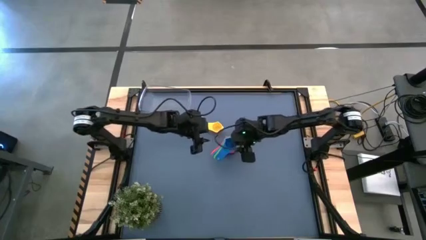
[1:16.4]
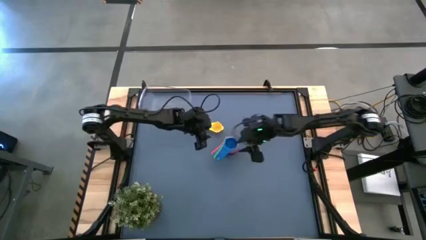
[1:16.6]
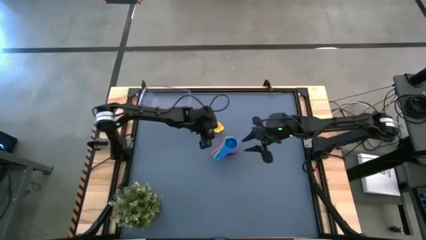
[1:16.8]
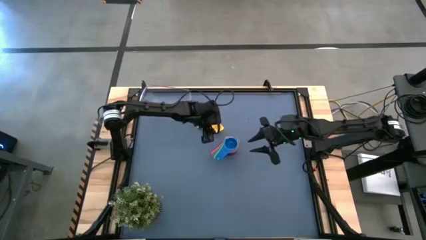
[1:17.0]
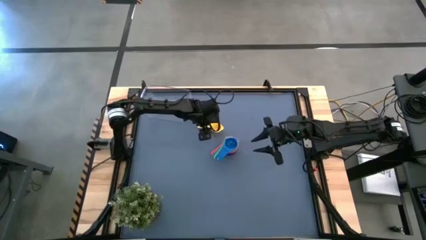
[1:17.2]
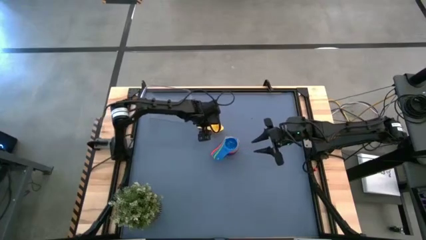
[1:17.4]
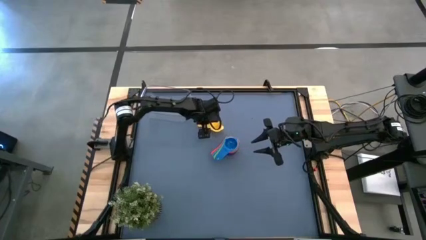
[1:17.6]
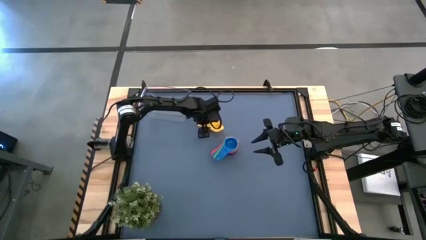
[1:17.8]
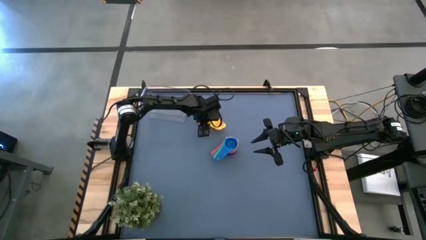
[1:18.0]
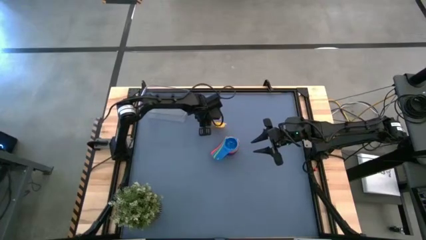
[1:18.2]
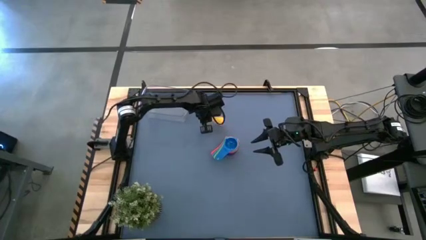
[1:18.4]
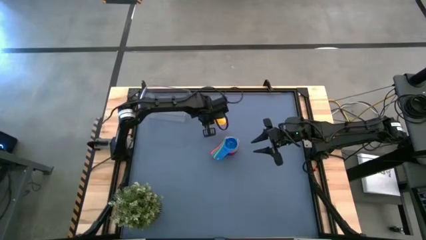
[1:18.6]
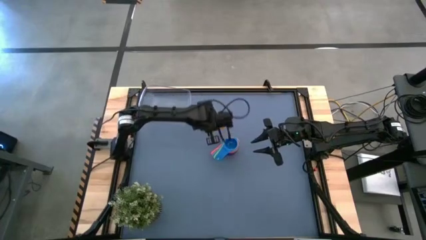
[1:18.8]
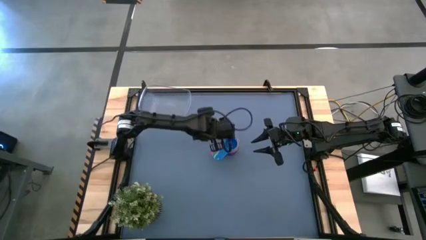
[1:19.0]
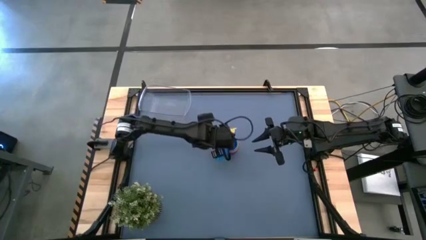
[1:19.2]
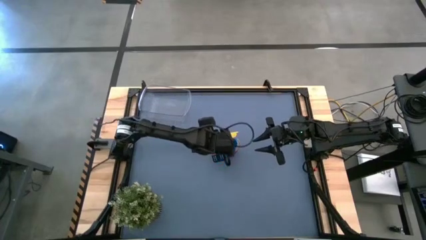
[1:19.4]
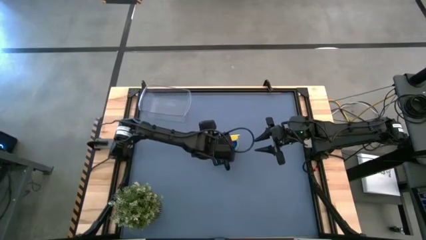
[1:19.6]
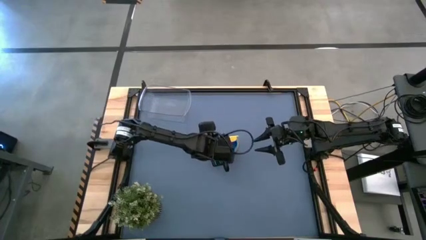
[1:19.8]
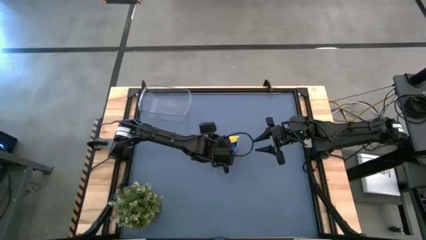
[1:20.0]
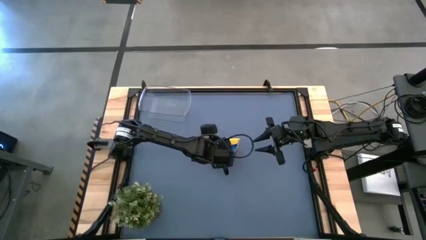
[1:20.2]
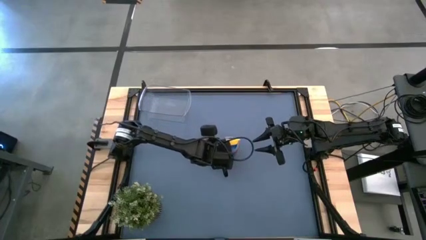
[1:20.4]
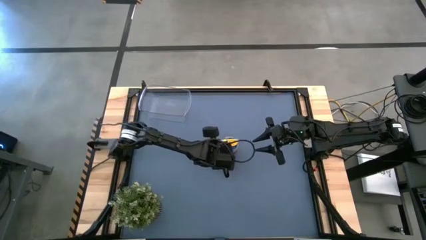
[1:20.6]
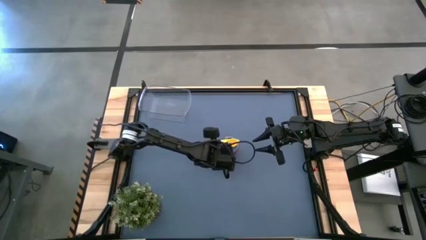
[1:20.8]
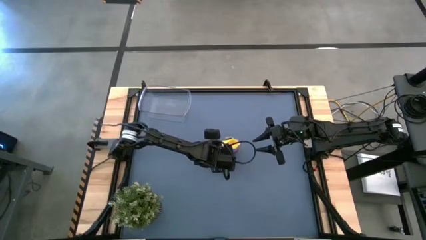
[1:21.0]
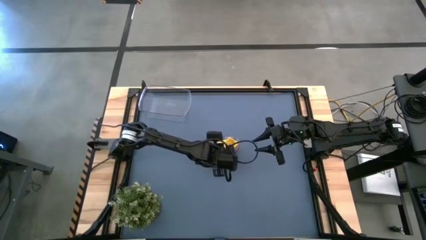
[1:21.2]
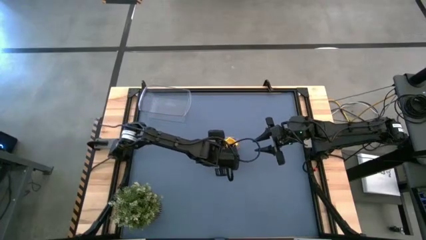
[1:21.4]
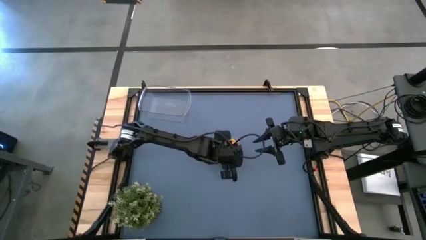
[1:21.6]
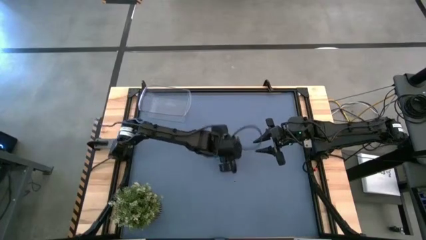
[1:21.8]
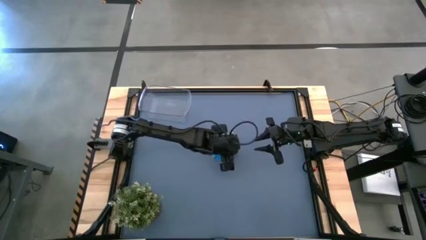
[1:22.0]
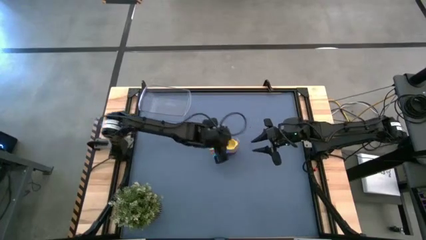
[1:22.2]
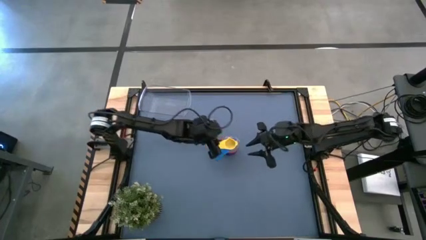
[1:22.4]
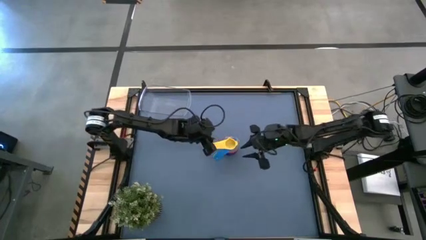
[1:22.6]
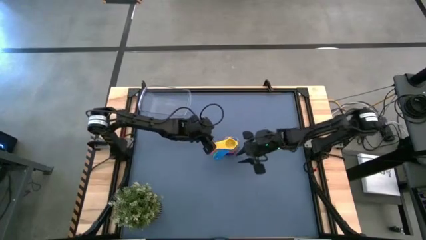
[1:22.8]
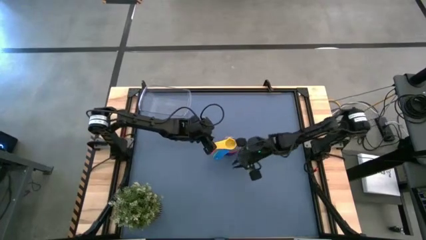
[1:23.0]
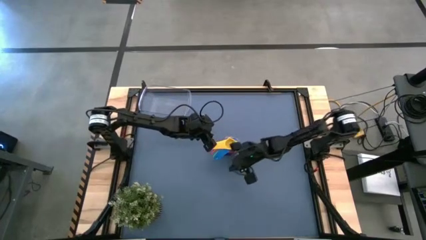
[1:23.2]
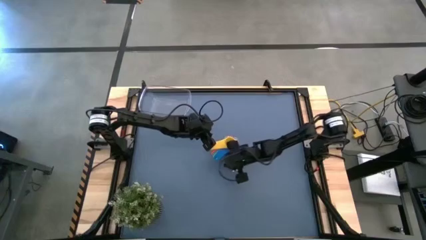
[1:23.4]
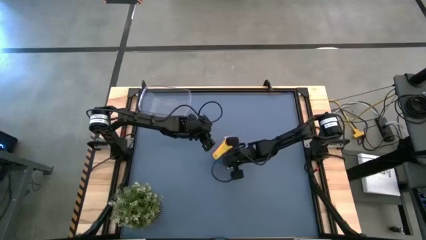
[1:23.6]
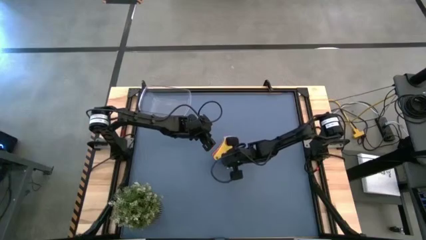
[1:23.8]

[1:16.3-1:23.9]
Task: Nest measuring cups in basket
Stack the yellow measuring cup on top of the blue measuring cup

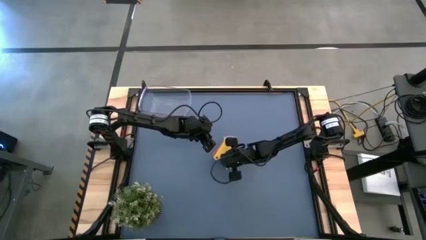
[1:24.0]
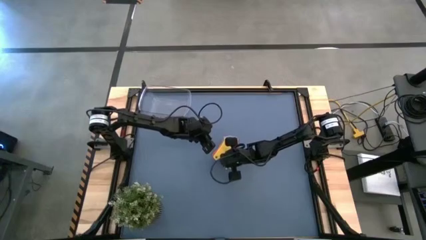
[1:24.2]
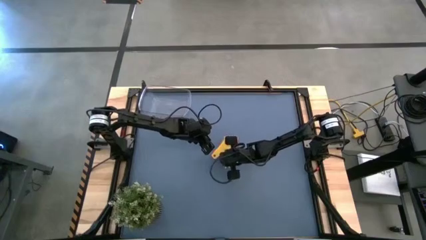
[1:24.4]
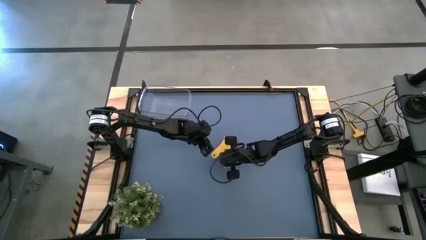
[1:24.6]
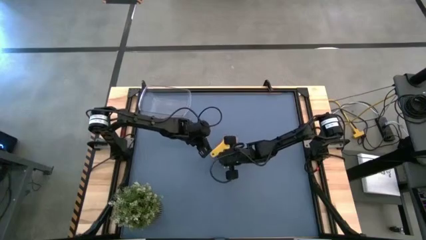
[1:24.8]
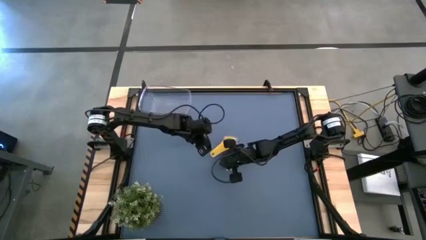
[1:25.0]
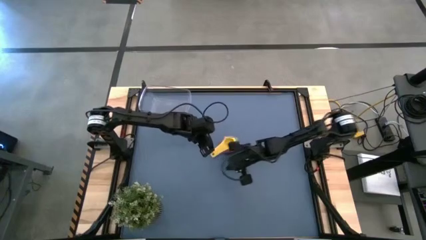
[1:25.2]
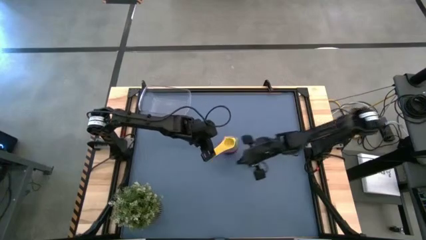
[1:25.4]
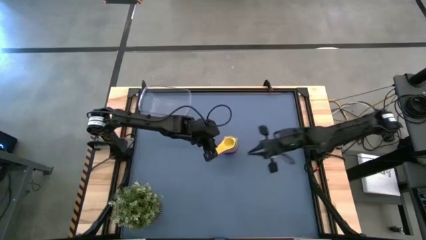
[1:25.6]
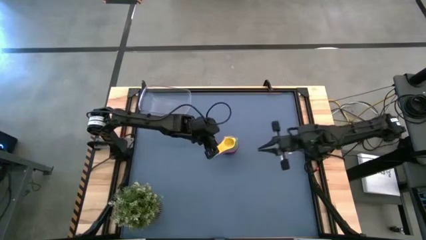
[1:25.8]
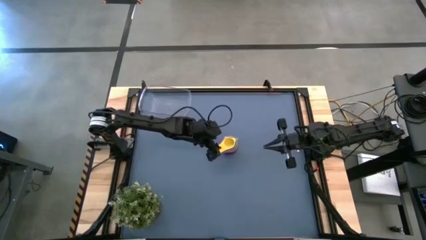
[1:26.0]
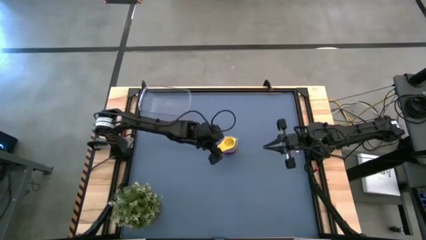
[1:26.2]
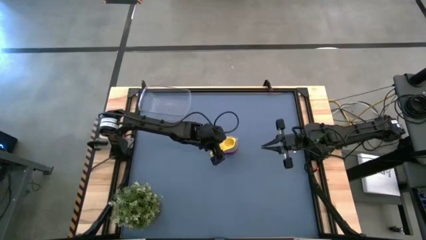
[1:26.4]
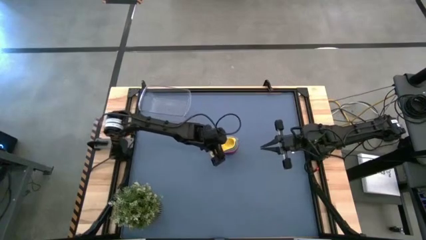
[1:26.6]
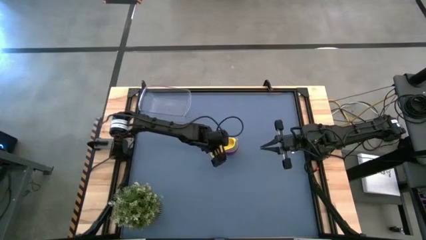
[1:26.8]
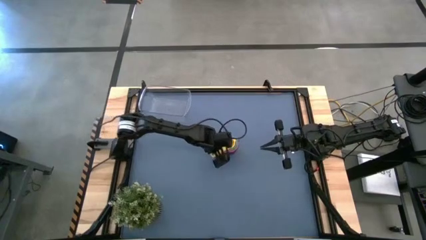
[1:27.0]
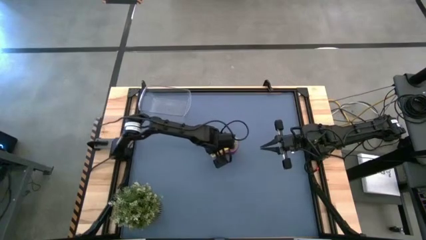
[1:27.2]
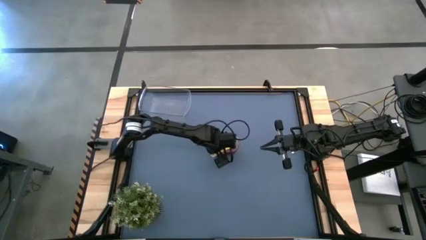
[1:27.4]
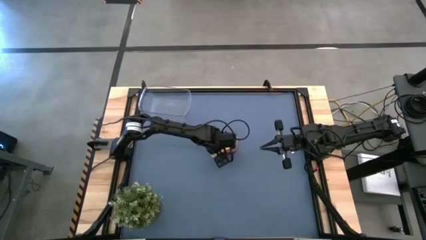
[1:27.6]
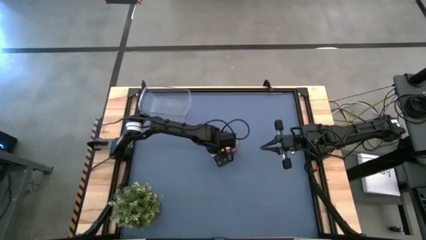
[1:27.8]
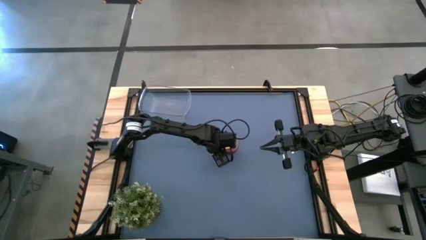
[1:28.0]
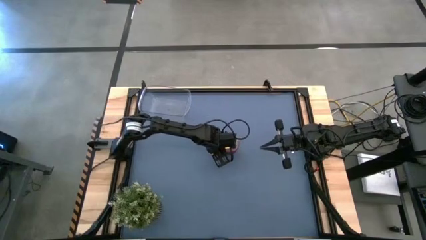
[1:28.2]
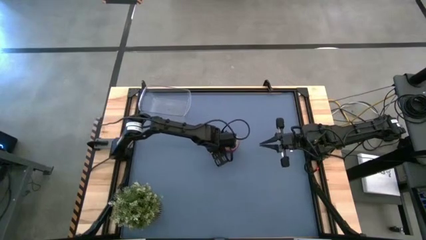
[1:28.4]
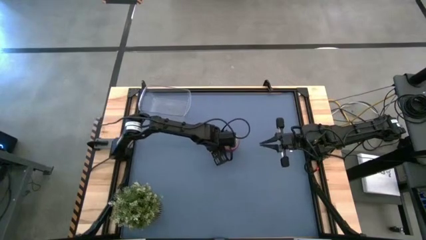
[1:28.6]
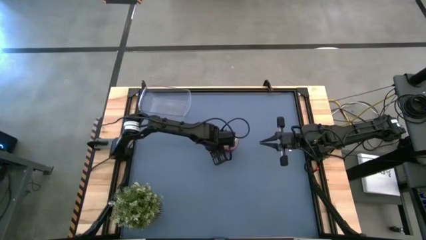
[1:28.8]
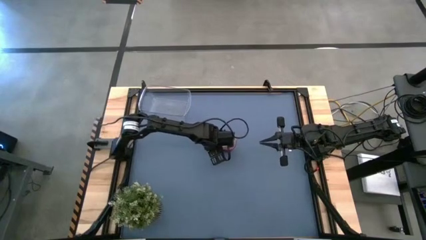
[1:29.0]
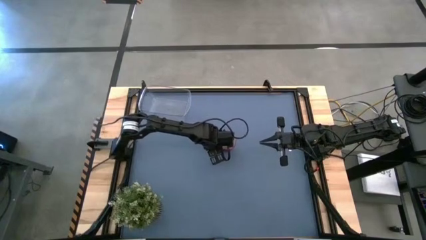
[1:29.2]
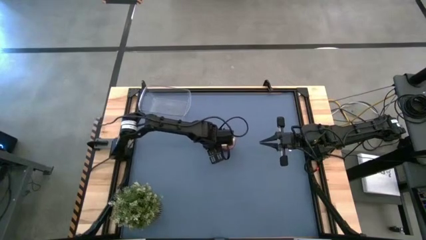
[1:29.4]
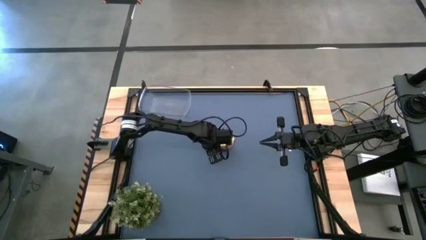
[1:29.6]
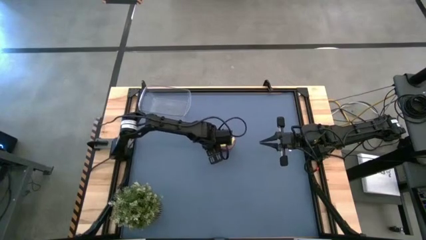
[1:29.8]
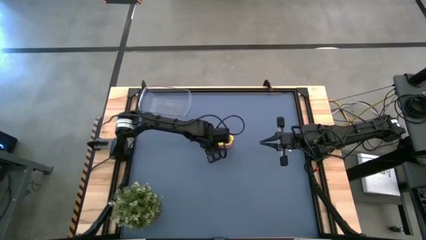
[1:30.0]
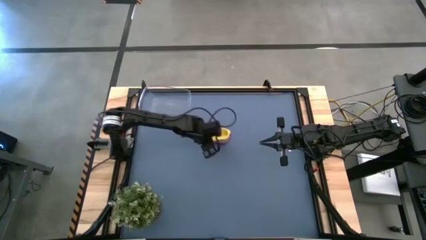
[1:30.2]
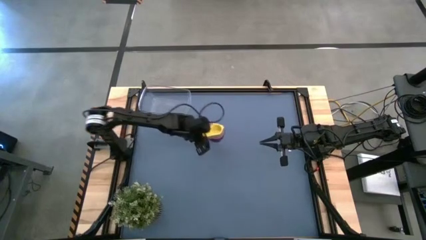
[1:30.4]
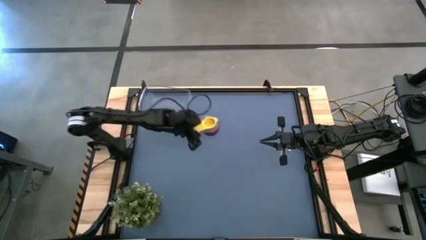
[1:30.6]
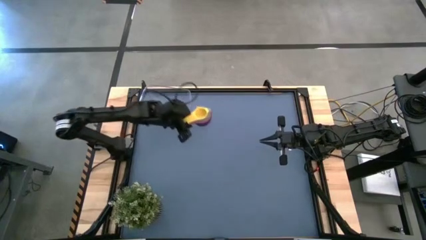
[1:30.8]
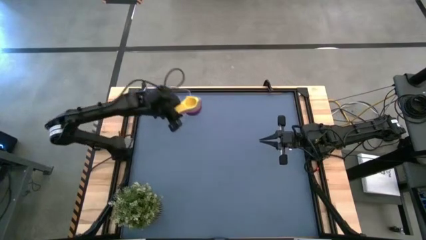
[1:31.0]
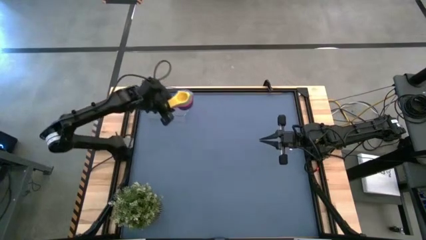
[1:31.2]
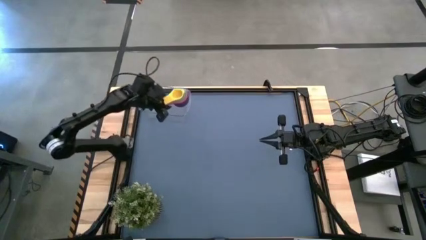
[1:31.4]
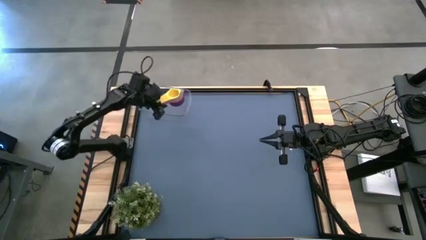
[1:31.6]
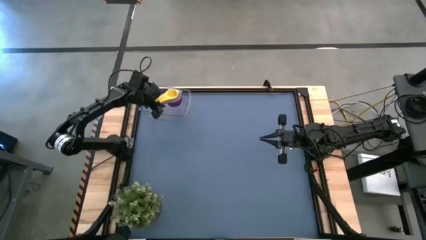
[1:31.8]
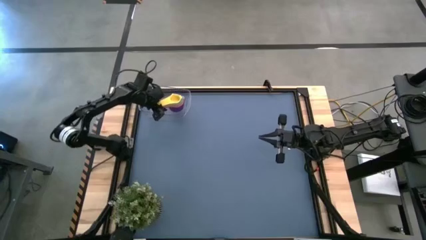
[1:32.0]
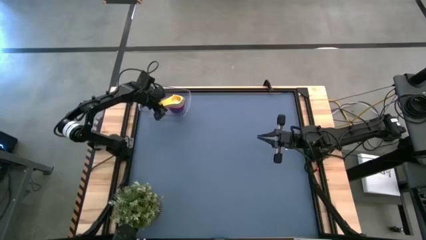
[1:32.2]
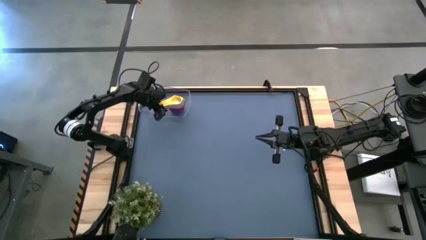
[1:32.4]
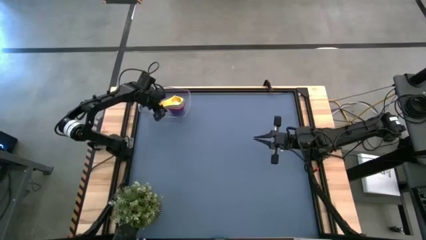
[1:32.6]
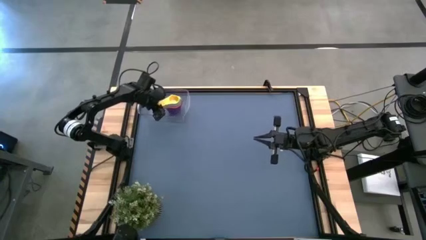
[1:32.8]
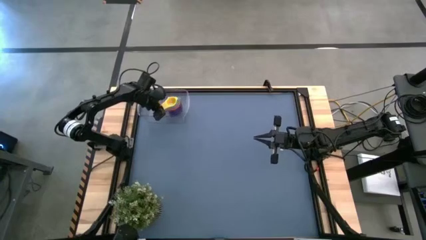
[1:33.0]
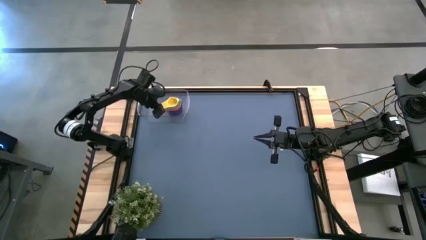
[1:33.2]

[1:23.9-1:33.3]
Put the nested measuring cups into the transparent bin
